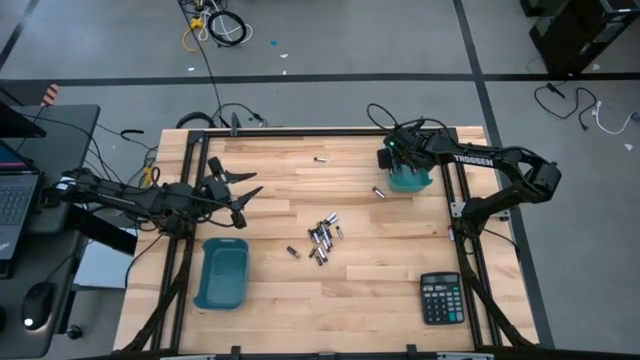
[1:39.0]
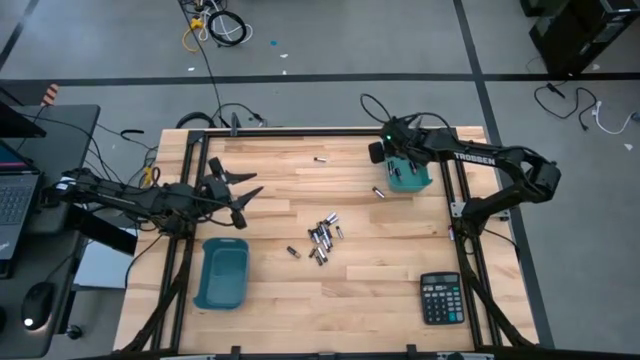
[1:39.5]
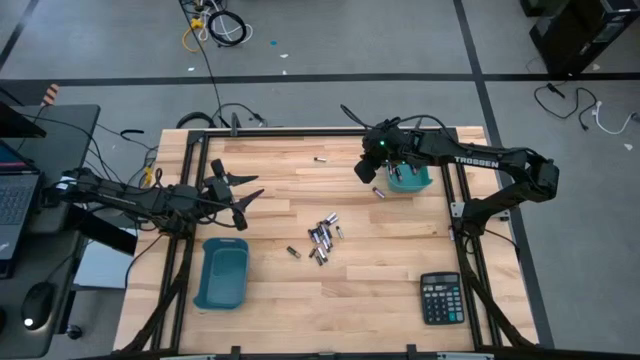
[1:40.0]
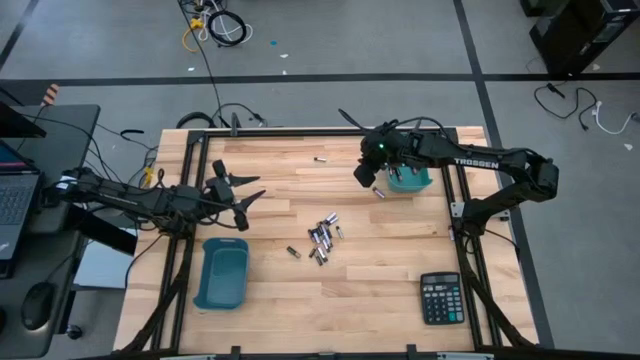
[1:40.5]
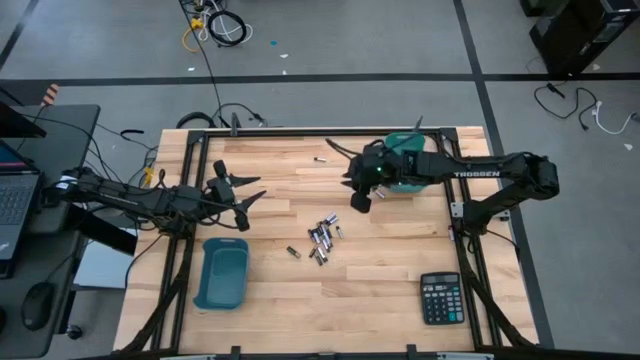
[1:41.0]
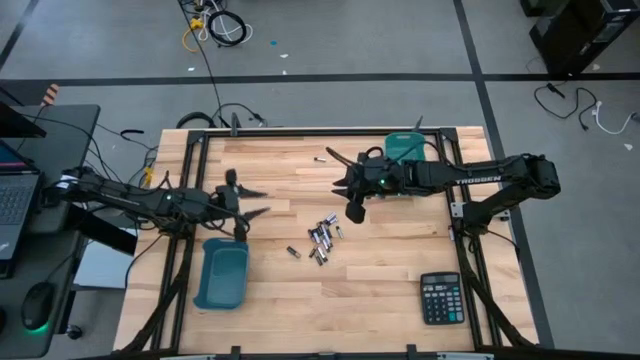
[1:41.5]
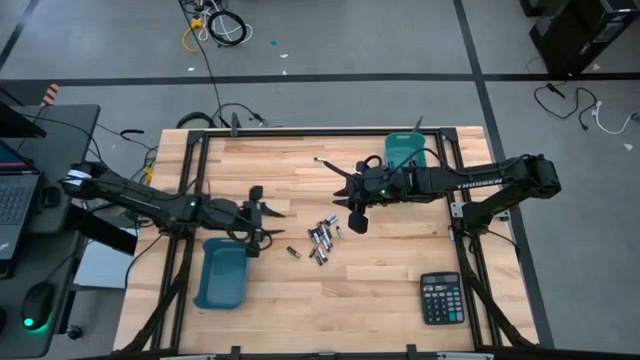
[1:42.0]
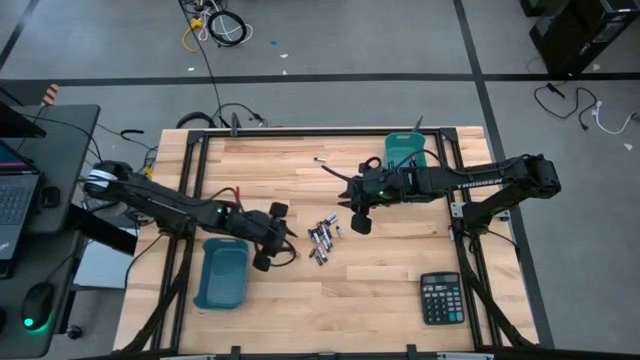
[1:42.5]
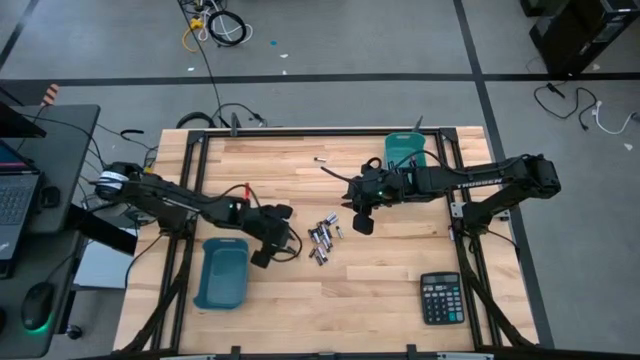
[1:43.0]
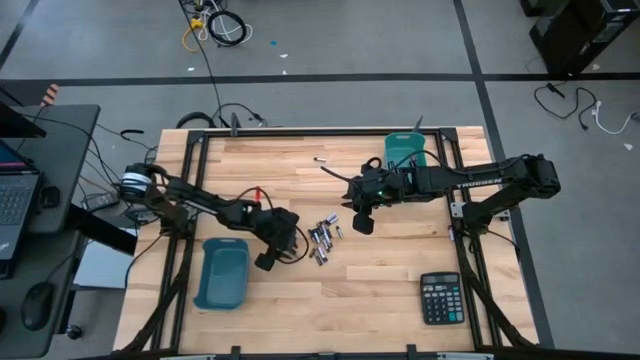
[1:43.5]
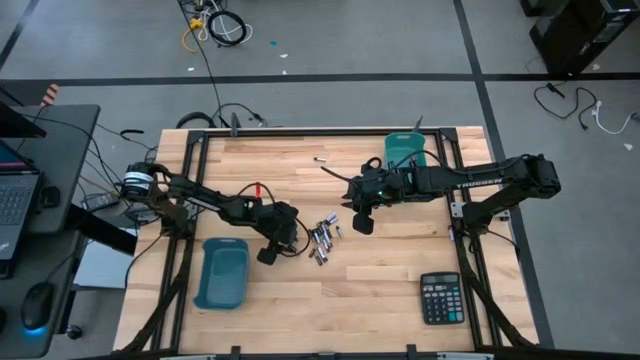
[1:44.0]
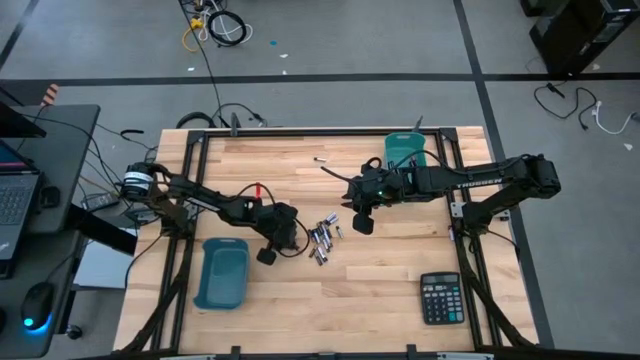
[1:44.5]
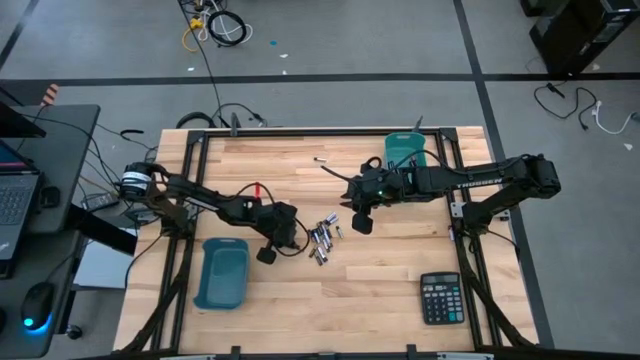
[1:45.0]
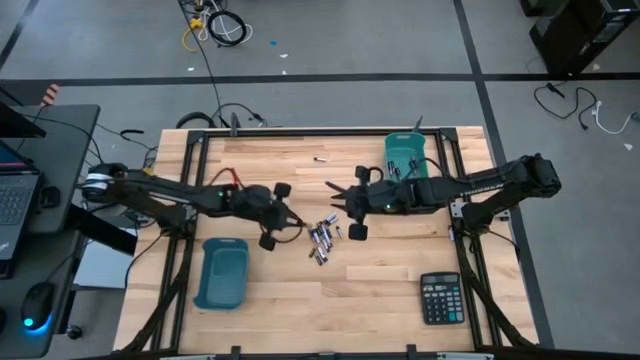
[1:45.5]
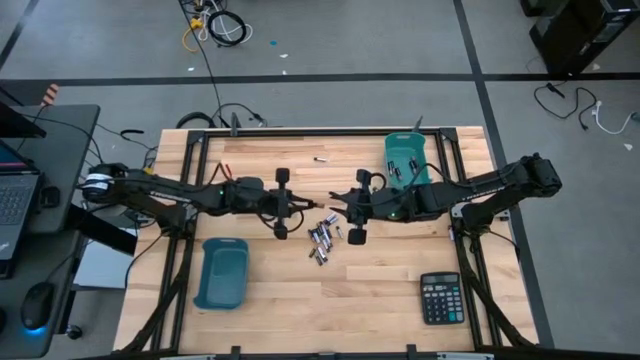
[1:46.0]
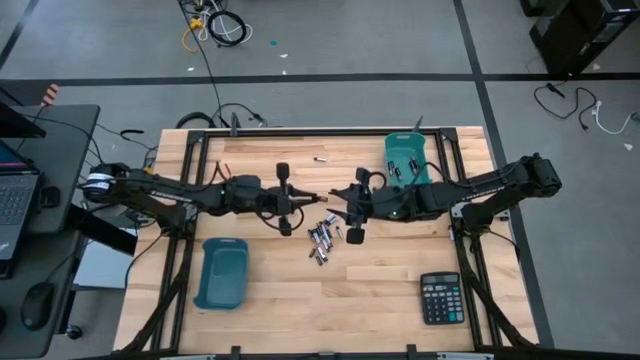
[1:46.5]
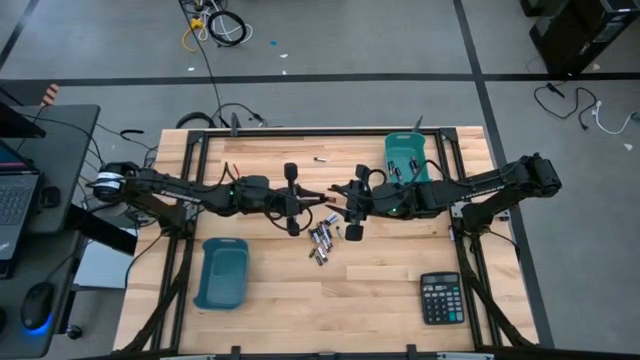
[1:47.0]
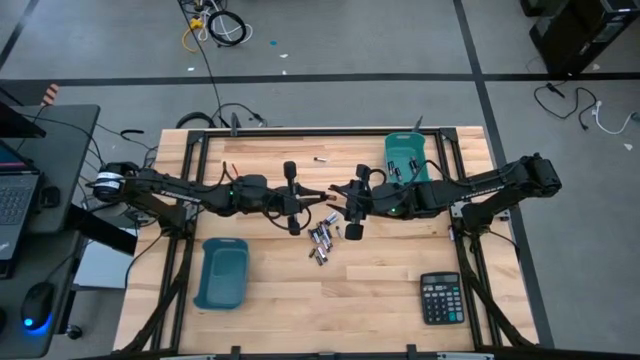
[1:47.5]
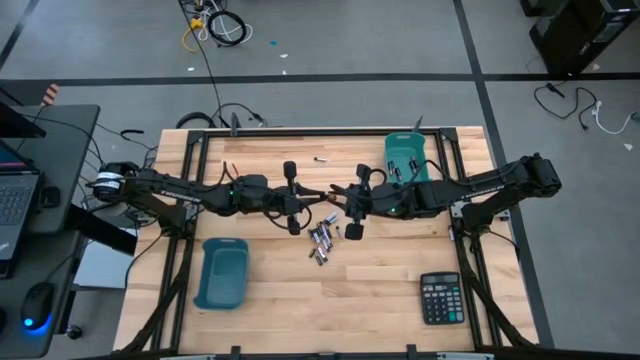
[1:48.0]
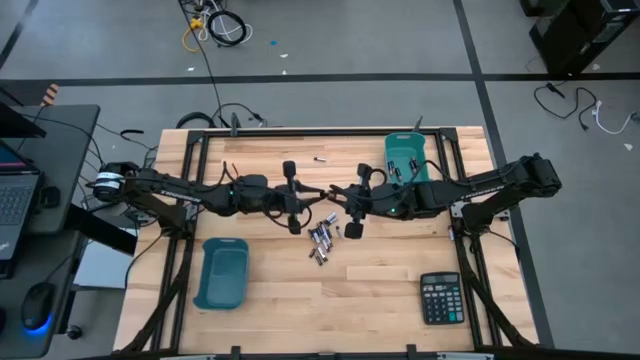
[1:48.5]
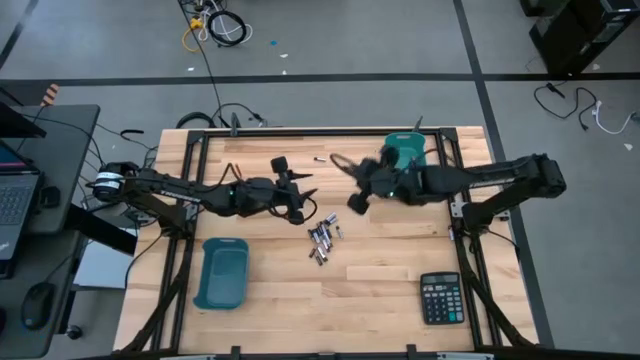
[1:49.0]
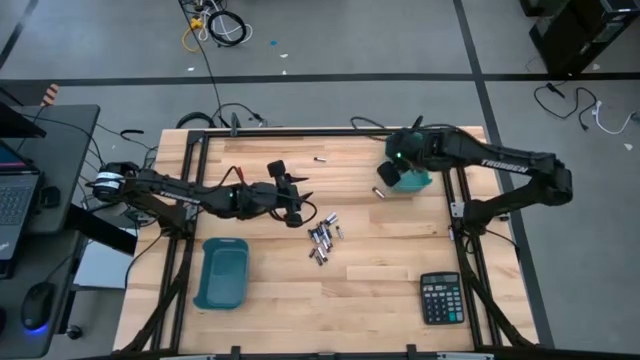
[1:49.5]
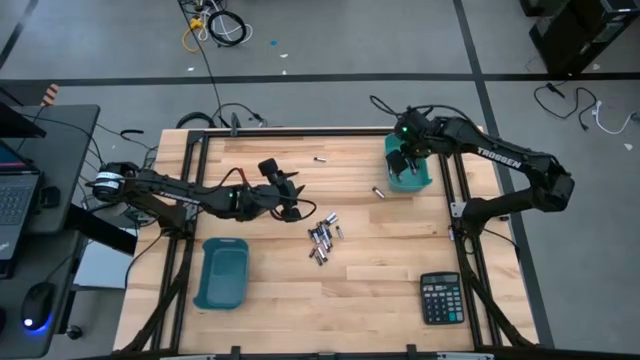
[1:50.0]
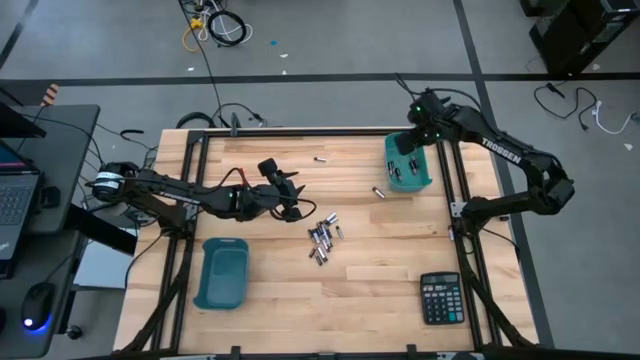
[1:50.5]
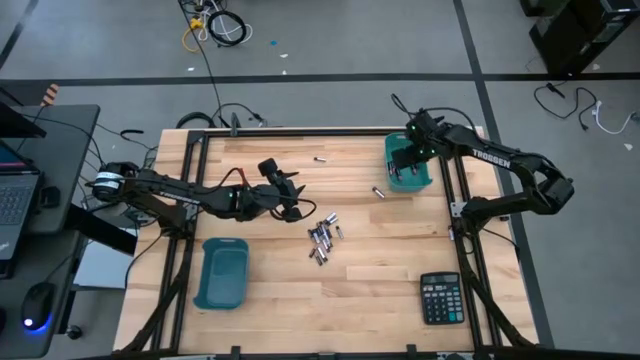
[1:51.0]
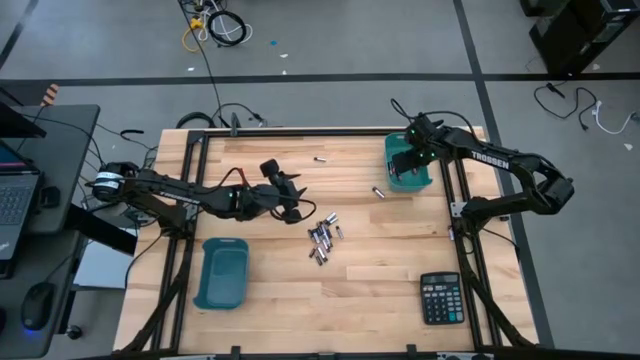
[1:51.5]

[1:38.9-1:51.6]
Task: Sort batteries
Put the black battery into the green bin

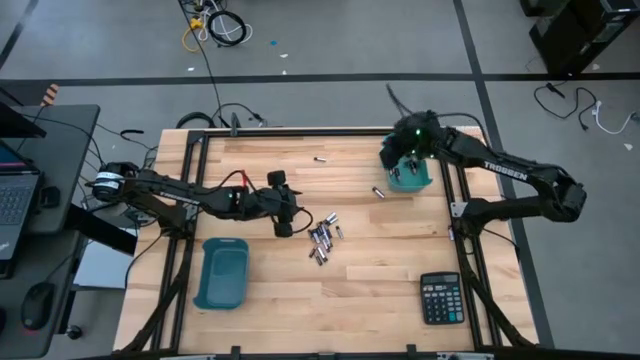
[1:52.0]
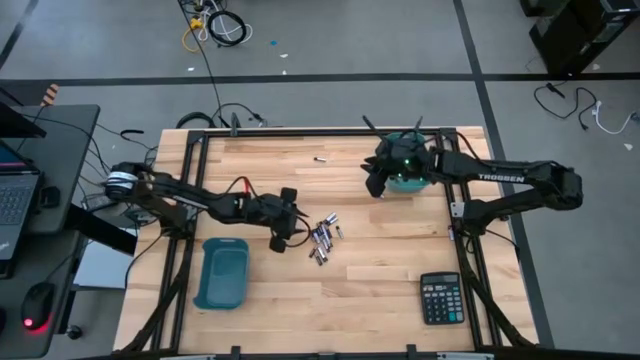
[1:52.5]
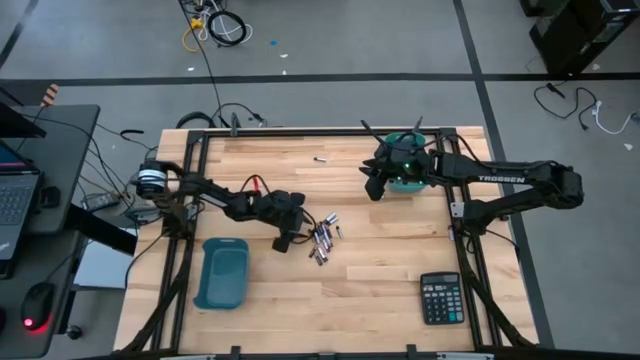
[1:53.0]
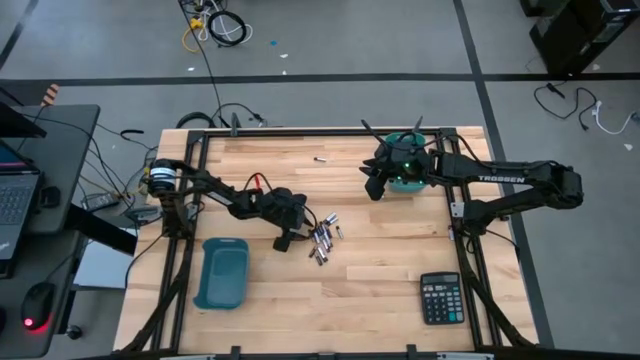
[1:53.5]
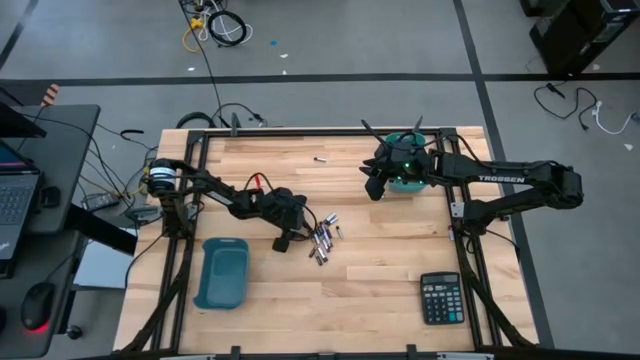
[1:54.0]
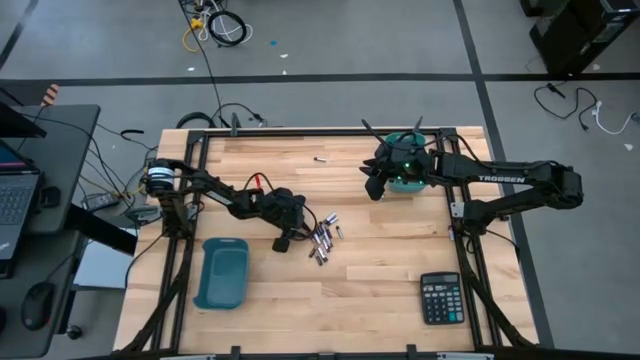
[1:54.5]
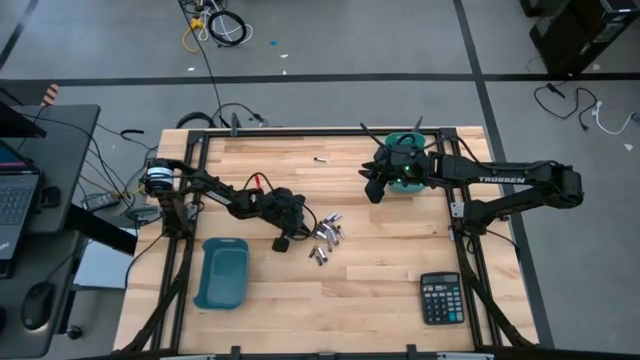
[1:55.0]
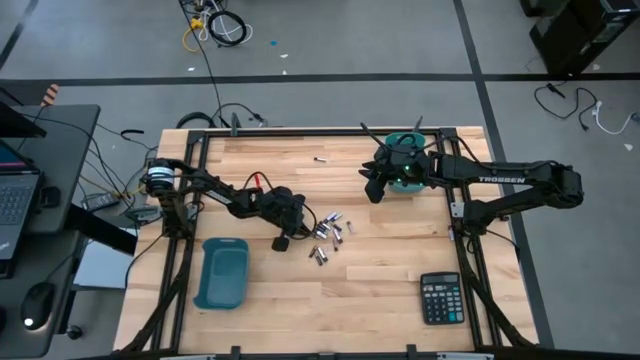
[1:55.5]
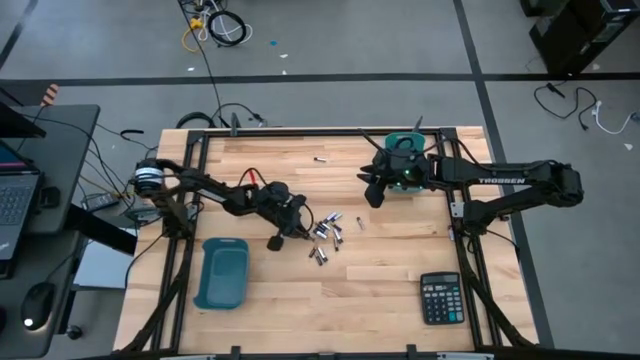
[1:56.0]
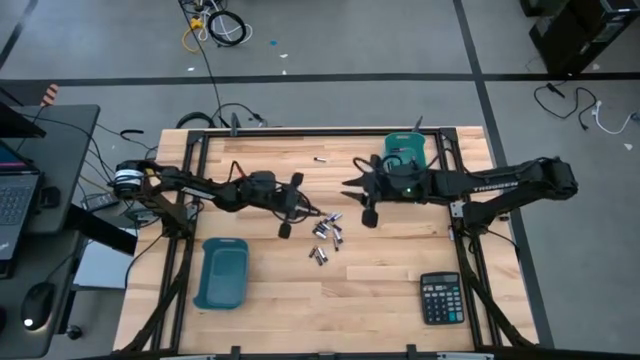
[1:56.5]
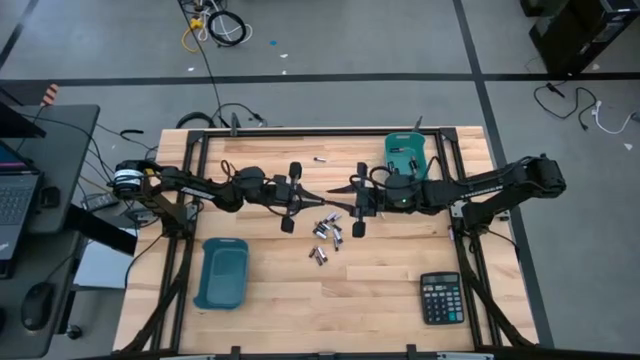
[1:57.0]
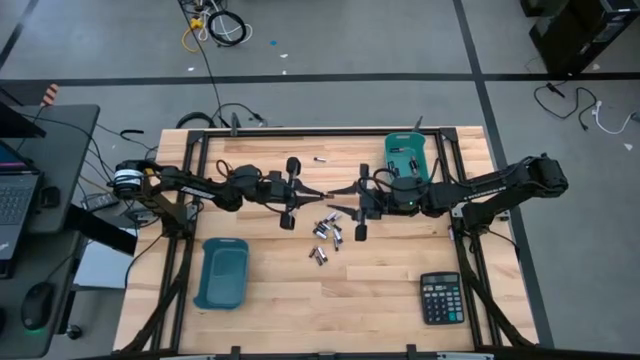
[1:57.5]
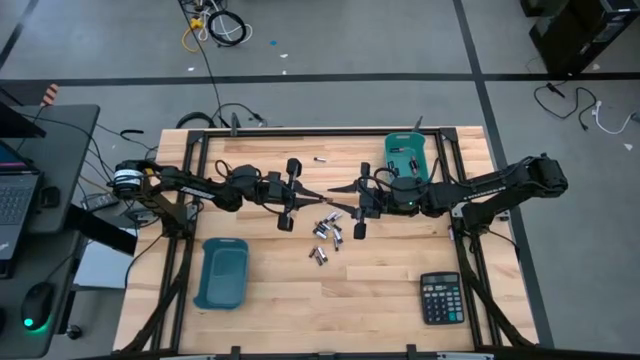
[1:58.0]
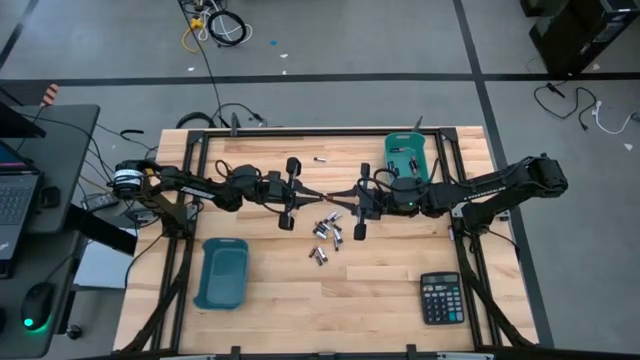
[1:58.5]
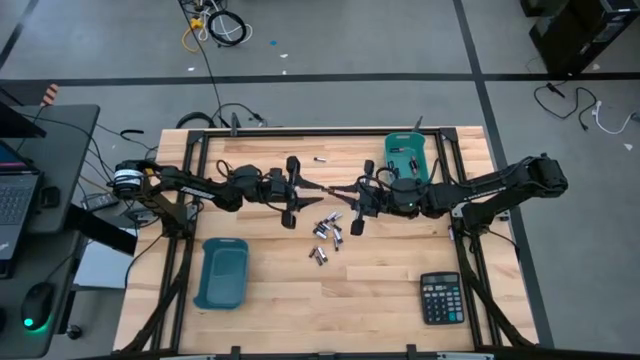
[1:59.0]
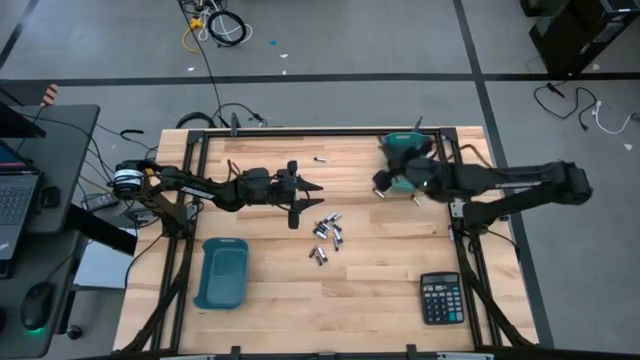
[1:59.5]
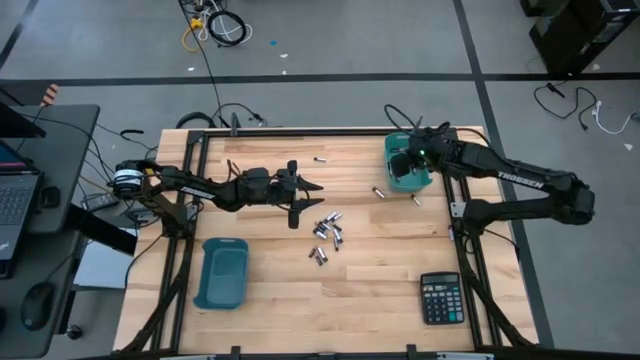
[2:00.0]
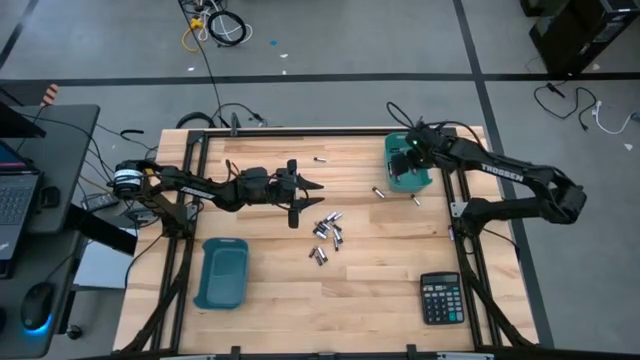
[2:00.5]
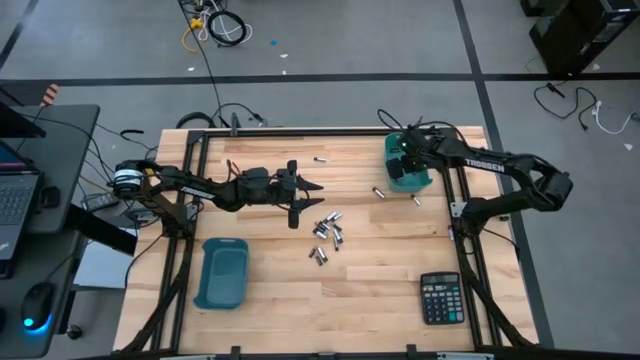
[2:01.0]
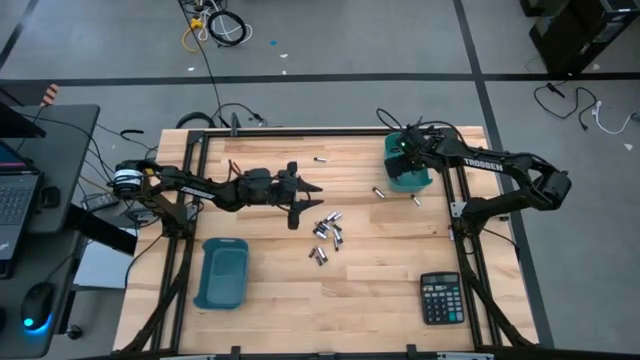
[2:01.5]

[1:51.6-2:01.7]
Put the black battery into the green bin
